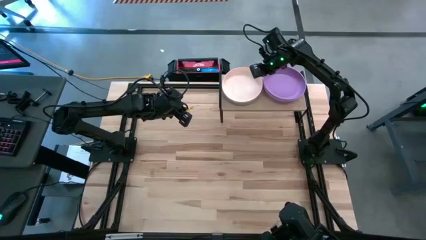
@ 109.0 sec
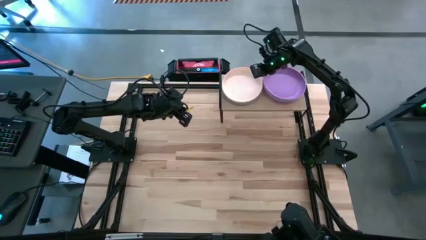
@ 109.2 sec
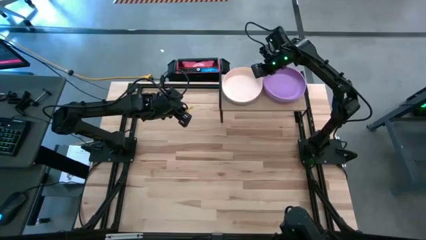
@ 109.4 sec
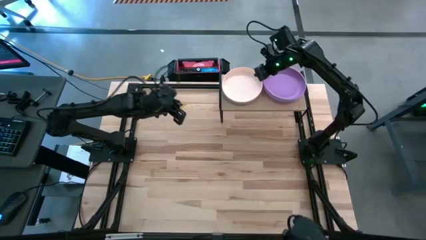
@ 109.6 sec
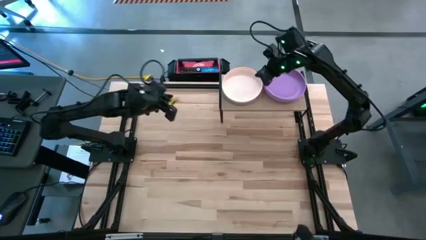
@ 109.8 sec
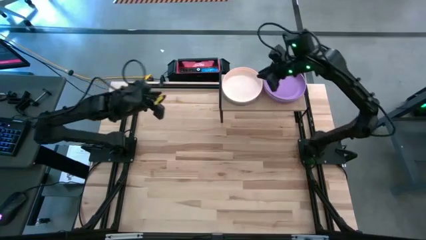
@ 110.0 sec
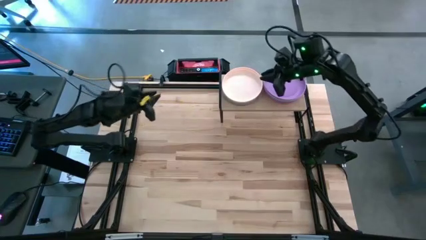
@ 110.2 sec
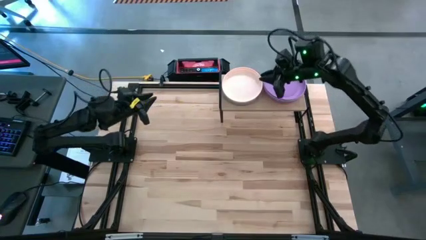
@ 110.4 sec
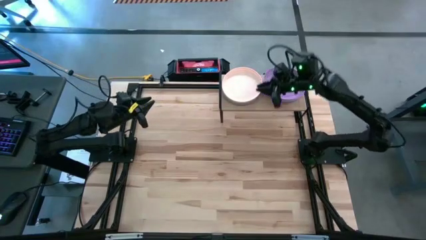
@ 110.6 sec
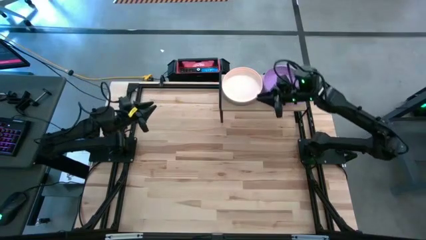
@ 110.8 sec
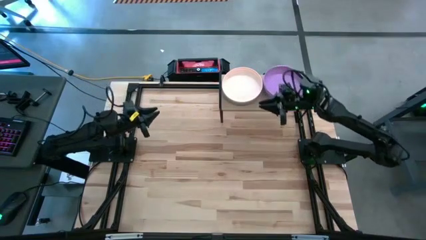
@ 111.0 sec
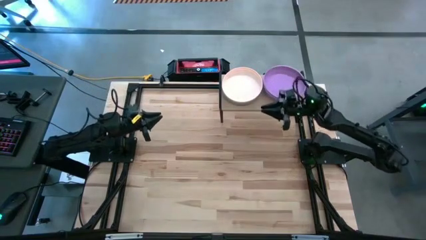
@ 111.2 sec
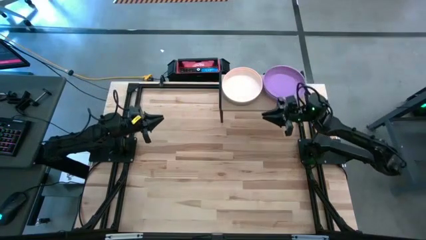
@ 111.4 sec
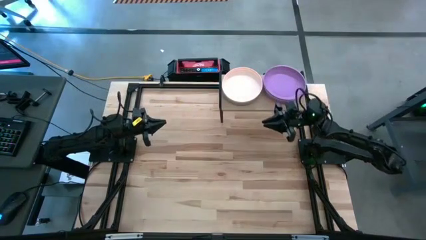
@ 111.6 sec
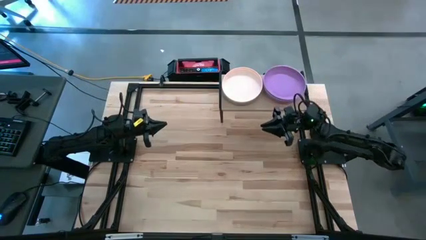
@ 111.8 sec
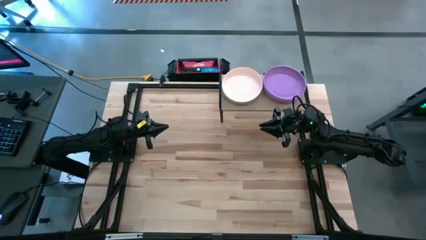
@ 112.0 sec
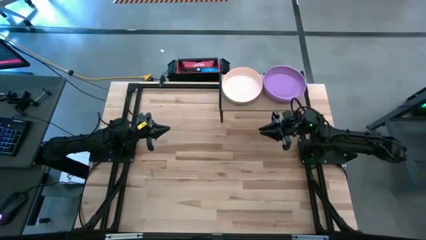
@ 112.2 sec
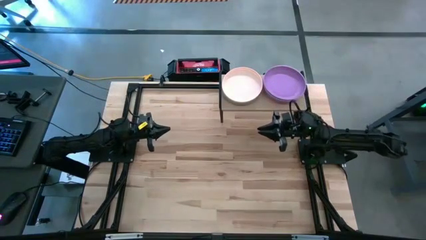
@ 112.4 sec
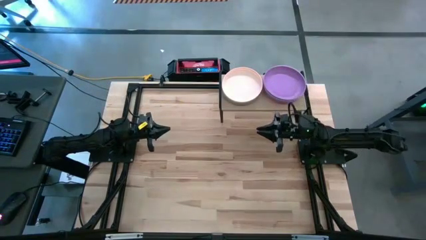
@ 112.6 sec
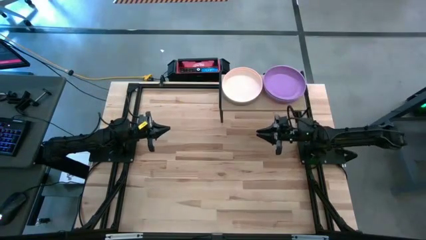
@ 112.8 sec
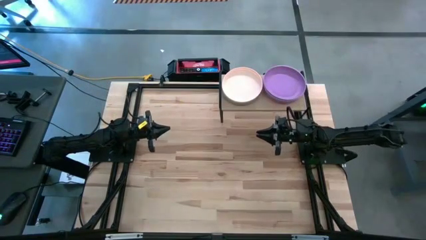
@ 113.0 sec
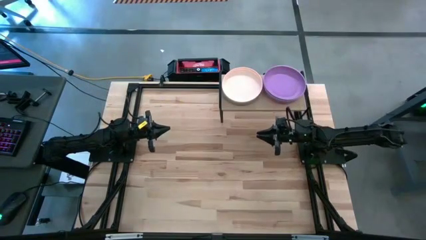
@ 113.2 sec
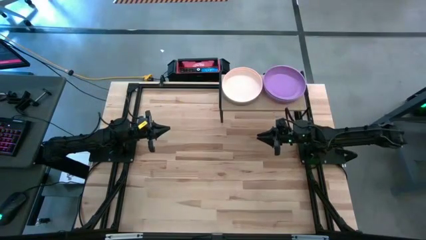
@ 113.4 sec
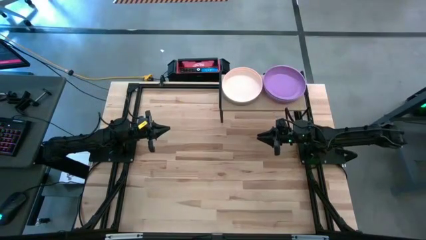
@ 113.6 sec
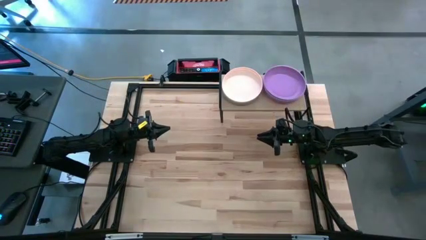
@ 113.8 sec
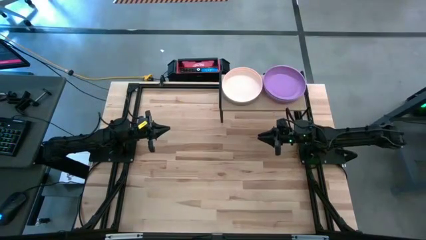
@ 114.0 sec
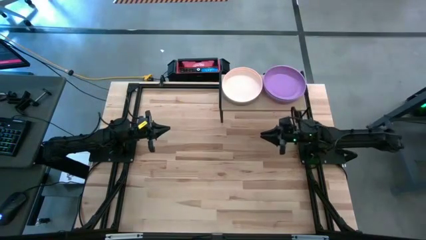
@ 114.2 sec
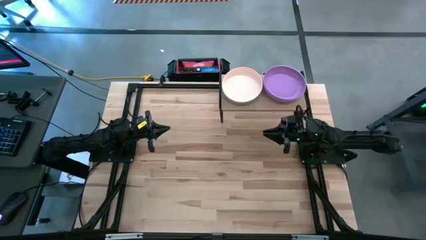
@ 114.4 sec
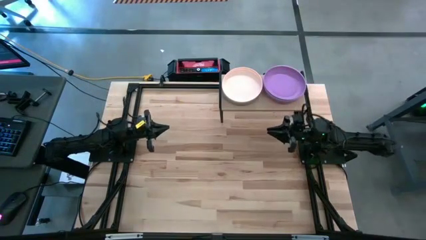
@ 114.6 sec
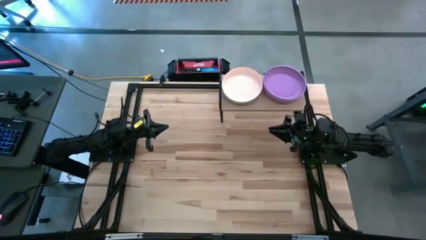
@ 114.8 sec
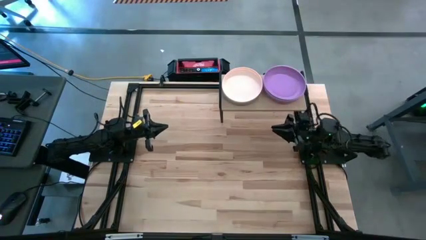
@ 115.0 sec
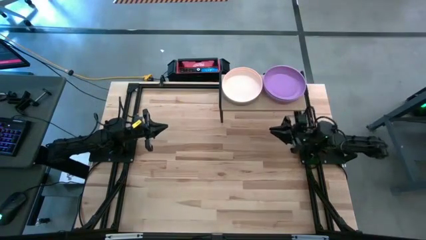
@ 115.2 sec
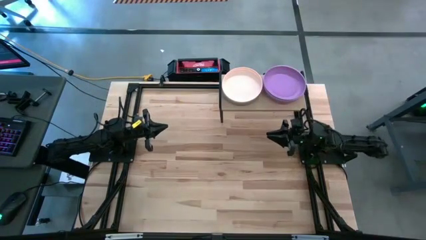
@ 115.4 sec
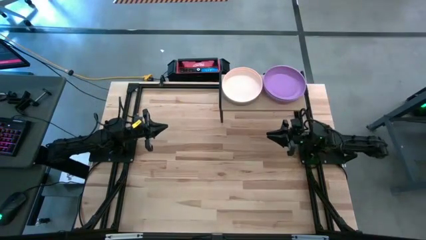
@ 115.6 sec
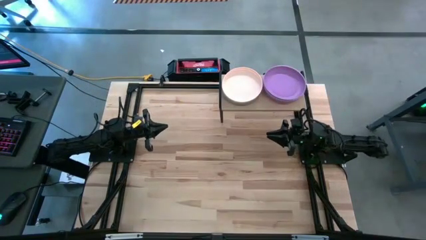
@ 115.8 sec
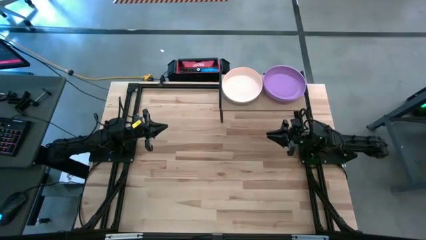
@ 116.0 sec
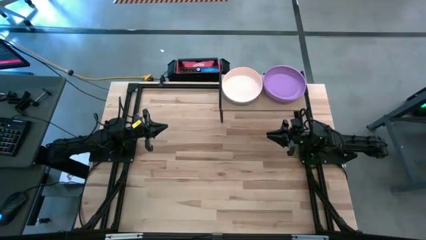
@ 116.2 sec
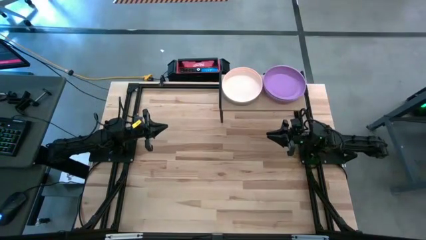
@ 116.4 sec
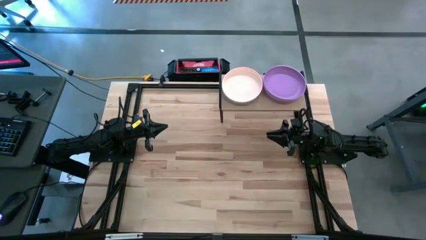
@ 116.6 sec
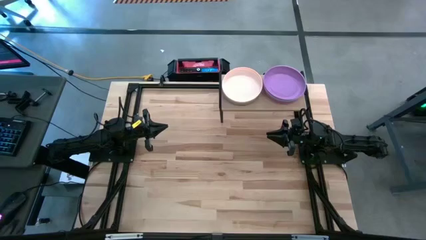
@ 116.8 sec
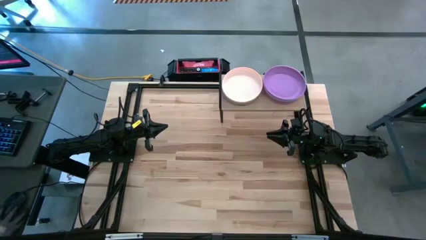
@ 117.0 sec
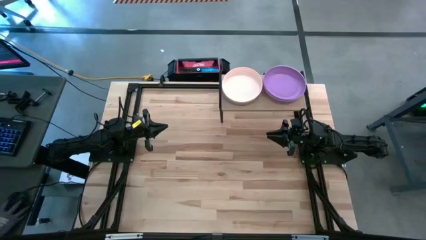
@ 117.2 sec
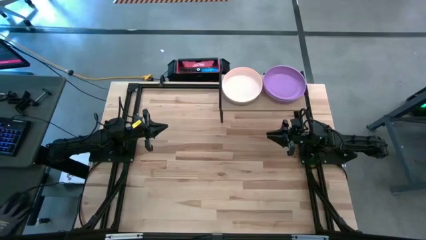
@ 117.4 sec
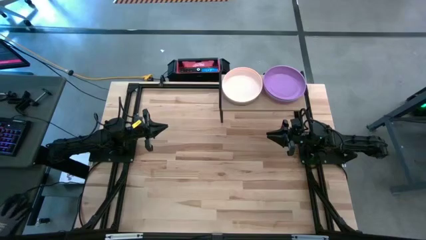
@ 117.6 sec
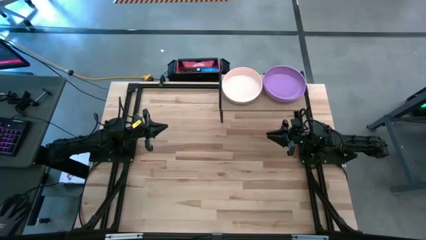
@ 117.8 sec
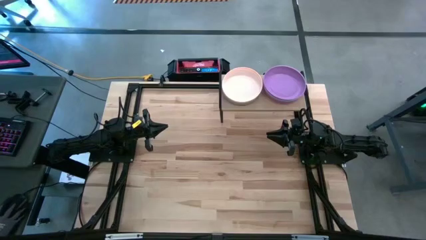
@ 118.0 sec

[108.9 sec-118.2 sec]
Task: Place and stack plates onto a shelf
Return to Home Position

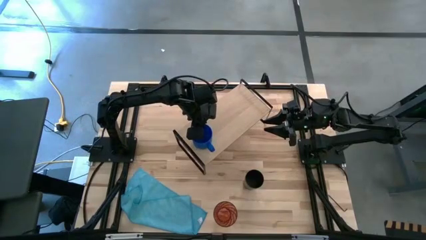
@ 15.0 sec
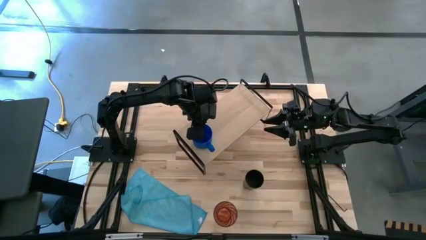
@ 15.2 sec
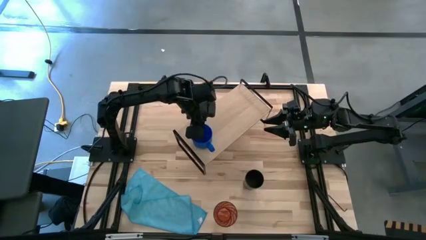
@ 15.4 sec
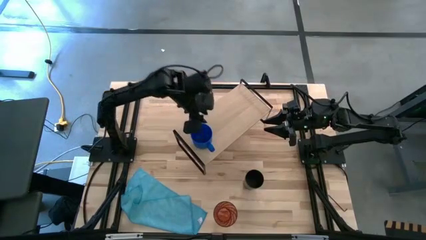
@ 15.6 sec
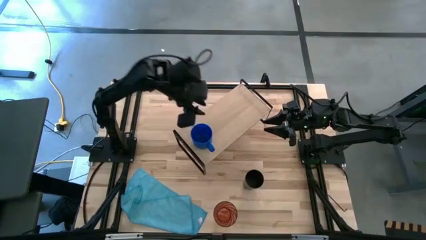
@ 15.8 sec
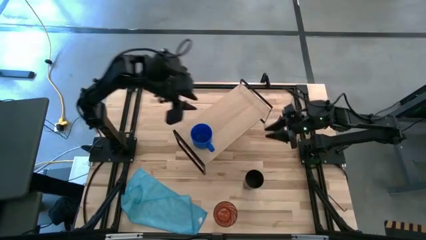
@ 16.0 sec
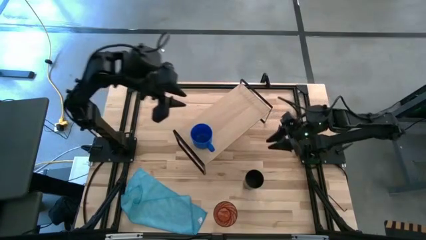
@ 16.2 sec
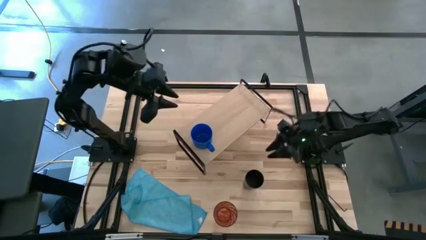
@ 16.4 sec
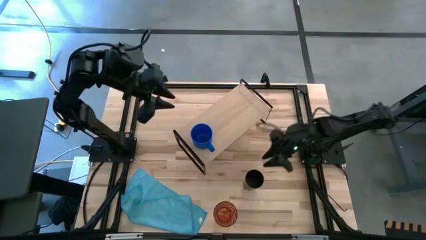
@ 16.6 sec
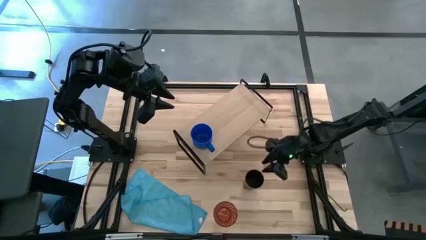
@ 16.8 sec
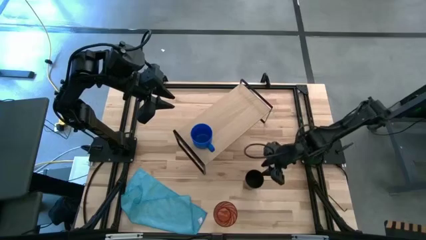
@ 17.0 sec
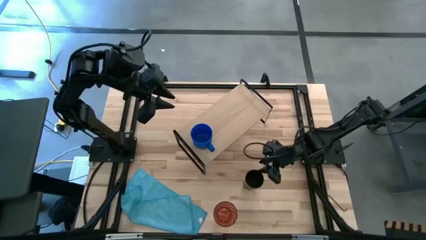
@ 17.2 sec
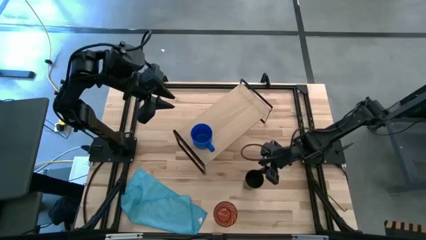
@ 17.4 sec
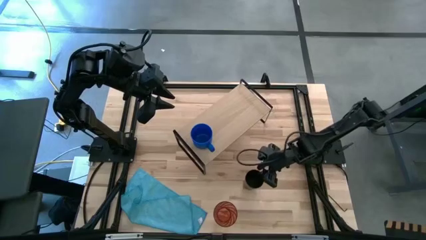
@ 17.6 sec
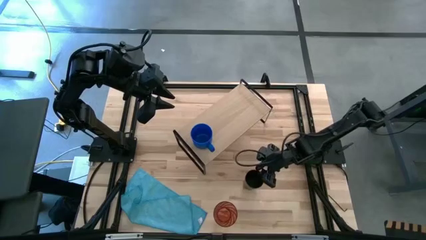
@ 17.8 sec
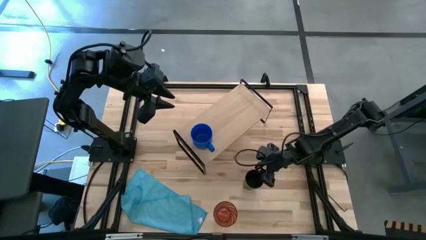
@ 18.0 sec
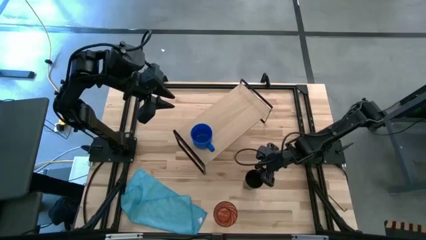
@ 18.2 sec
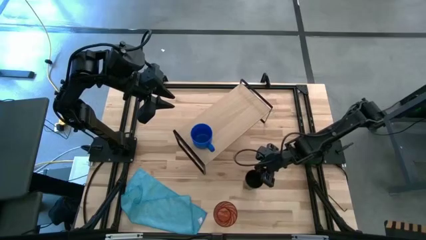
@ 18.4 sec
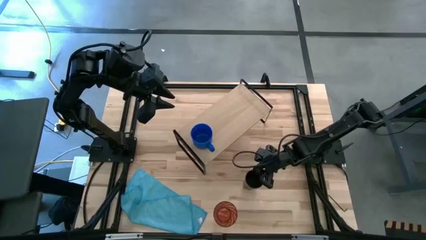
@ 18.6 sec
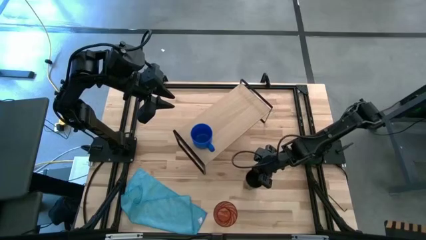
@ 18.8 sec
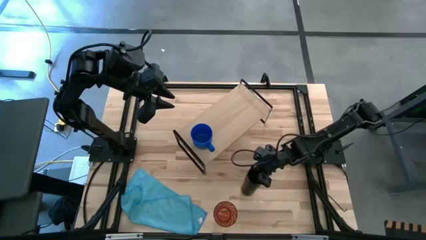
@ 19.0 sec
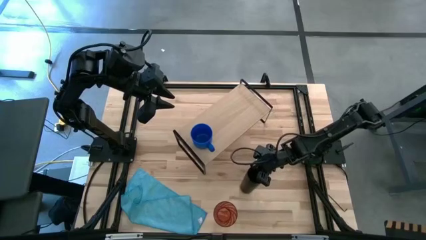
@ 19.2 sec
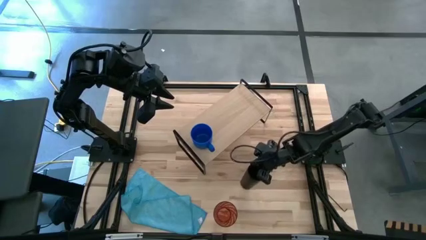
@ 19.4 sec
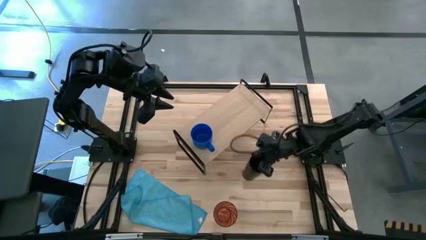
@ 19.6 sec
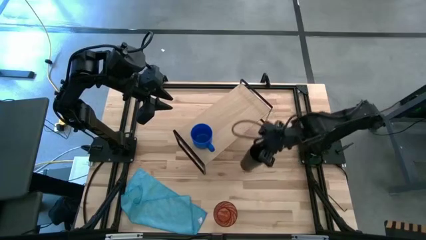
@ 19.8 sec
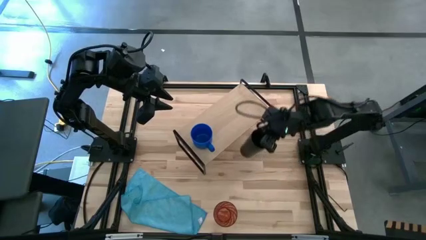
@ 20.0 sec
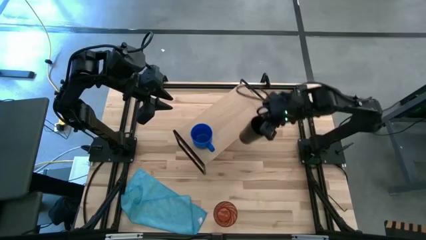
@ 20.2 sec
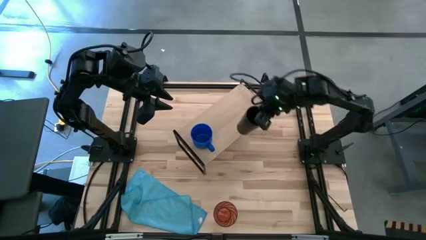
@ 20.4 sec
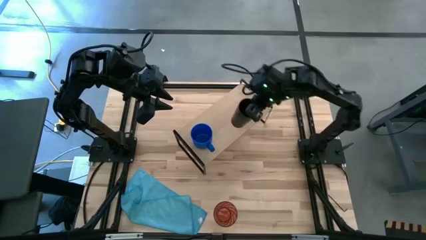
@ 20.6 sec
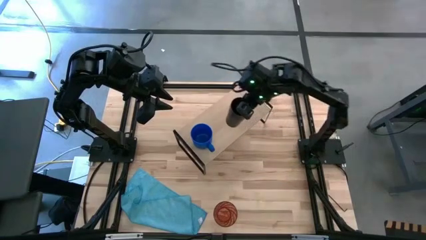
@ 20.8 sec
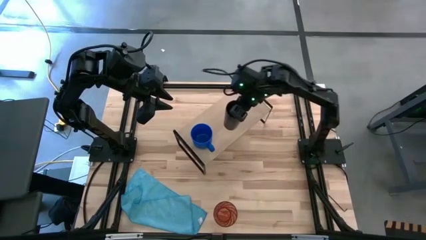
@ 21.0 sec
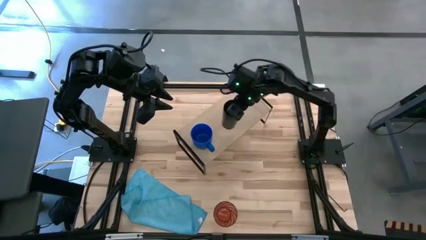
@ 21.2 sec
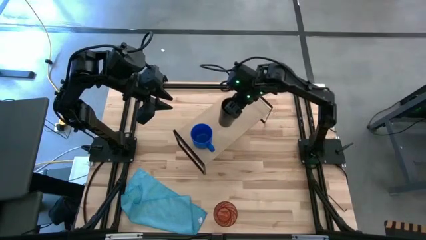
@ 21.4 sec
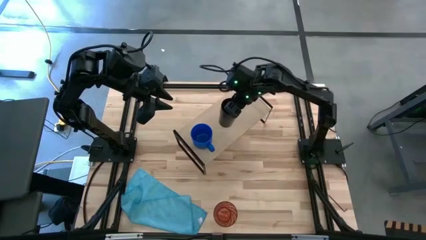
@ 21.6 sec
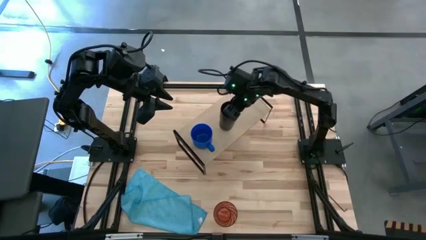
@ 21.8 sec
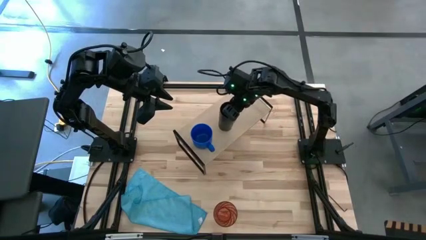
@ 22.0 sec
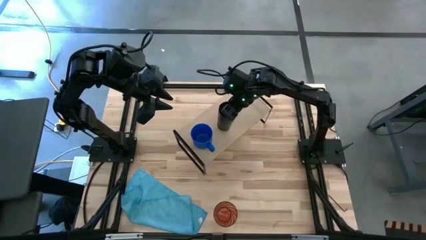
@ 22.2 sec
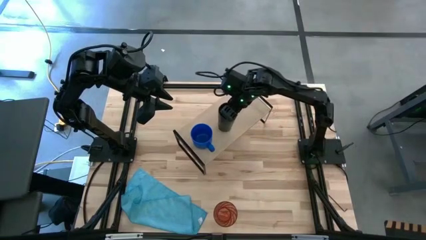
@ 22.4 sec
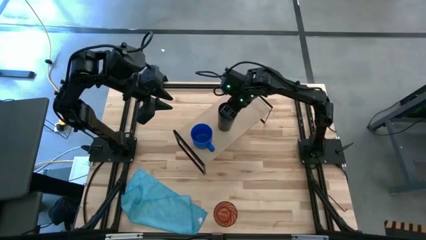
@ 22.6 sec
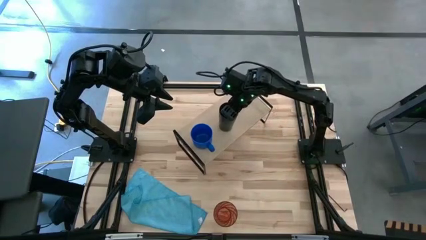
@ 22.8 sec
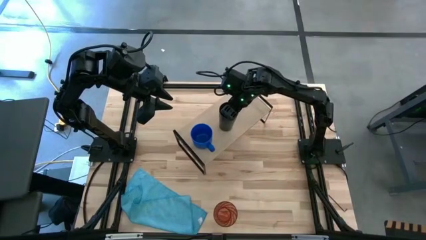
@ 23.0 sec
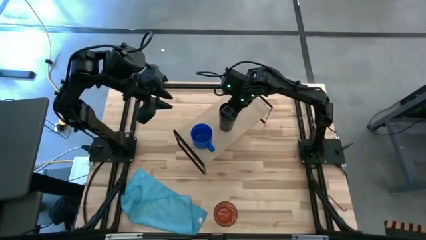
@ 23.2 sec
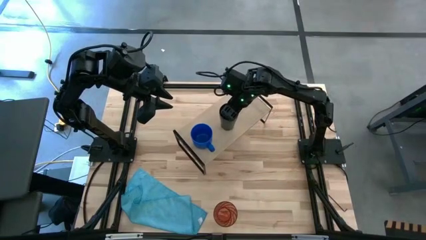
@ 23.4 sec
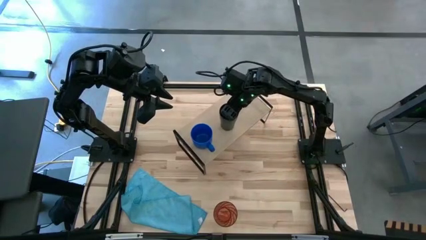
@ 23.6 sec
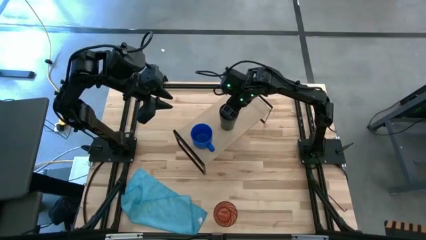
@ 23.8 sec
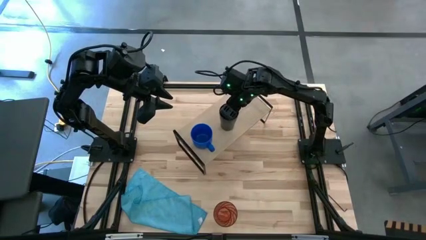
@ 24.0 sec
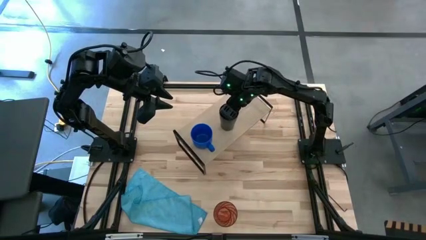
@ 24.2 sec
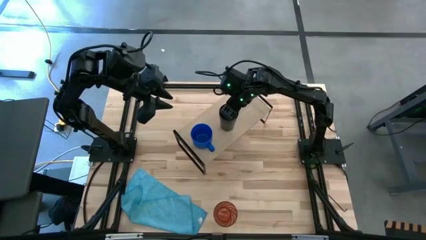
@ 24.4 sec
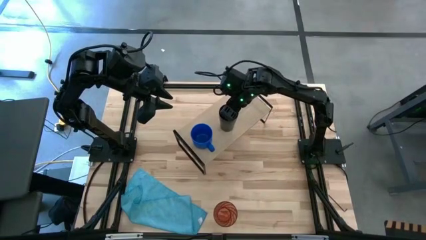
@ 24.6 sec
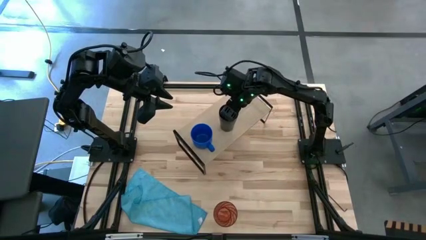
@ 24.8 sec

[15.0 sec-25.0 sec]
Task: Stack small to large cups/mugs on shelf
Put the black cup on the shelf
